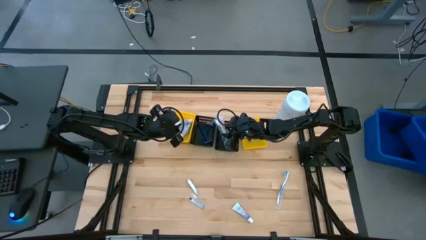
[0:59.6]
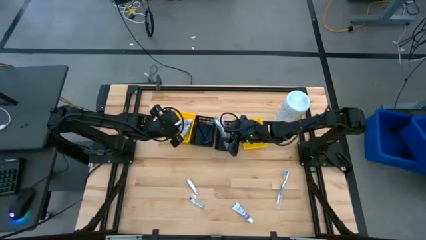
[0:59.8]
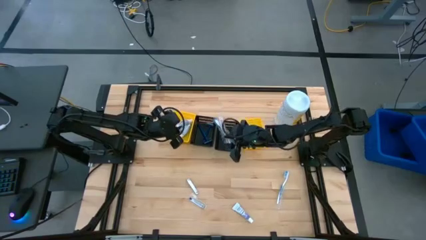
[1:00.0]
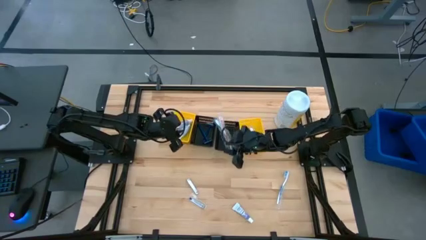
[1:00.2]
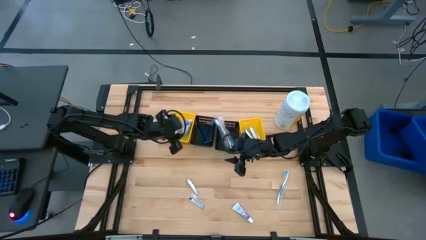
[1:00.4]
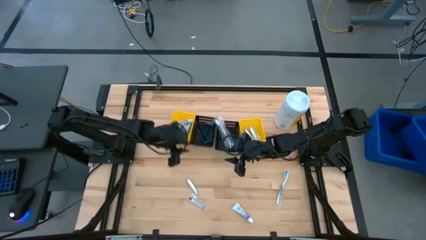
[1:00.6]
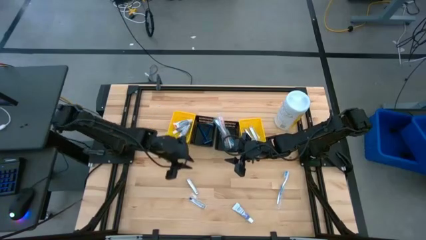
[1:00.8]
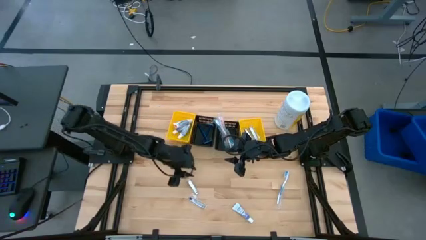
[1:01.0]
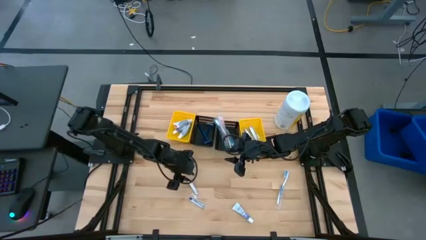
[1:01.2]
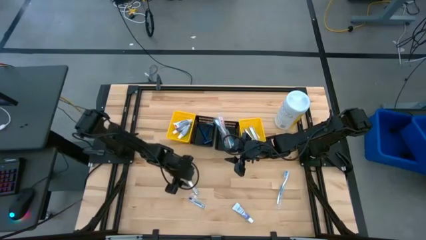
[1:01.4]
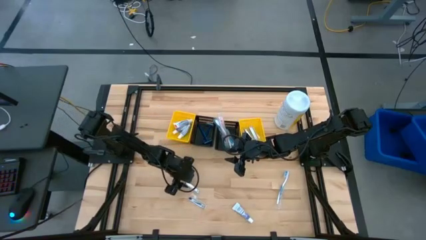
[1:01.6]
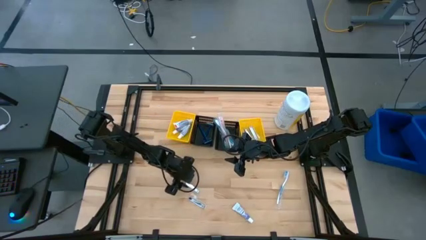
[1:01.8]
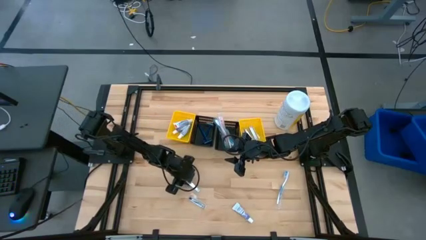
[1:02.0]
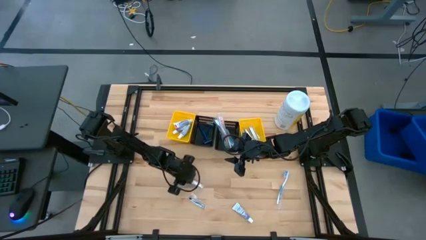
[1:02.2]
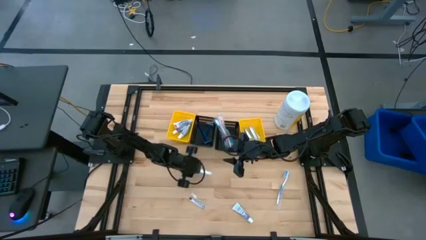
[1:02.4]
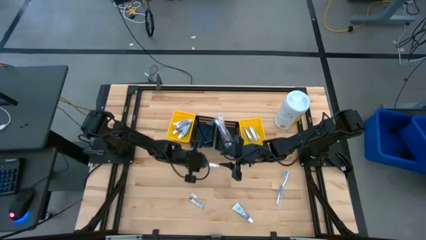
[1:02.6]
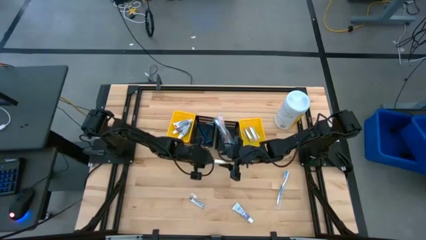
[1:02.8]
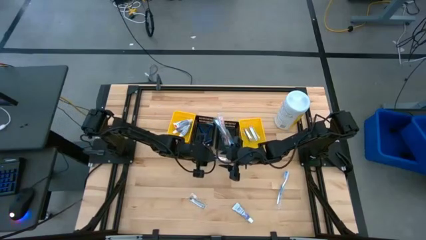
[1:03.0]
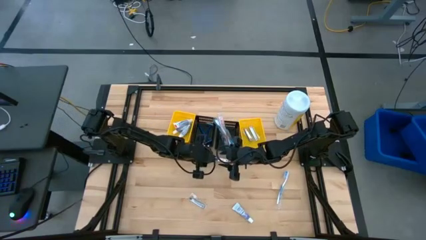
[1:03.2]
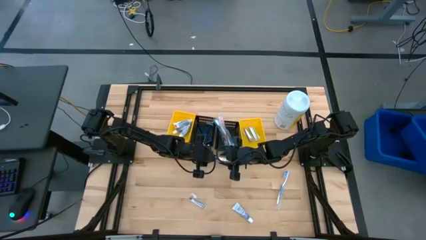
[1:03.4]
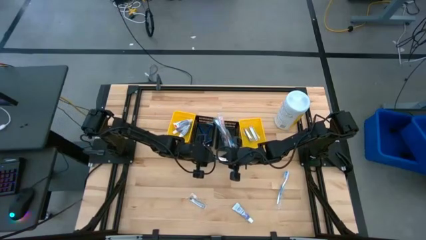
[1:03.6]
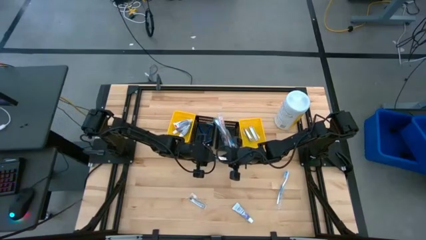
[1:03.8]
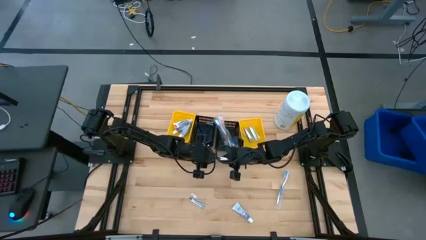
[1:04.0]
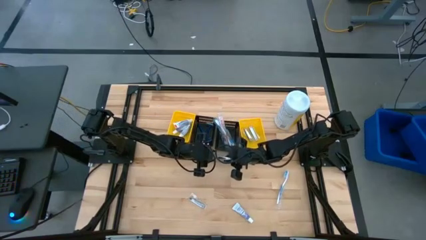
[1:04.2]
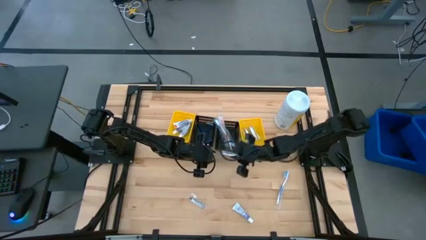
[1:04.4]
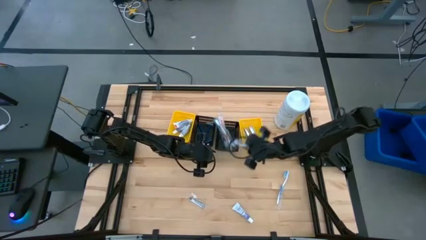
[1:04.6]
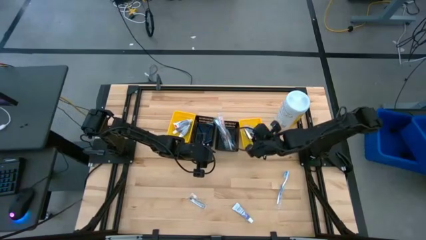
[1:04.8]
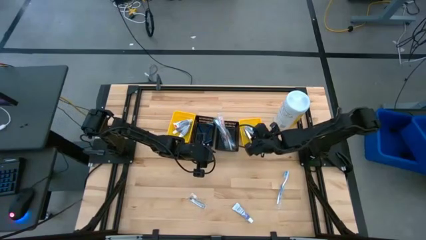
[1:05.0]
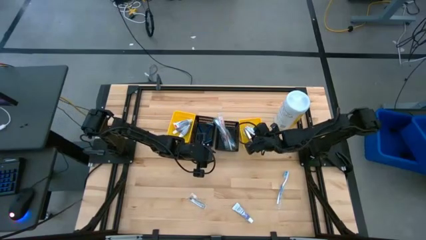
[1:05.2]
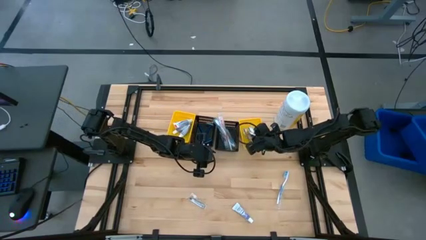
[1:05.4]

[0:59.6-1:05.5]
Task: Pick & Place Travel size toiletries
Put the silver nail cutter into the right yellow bin

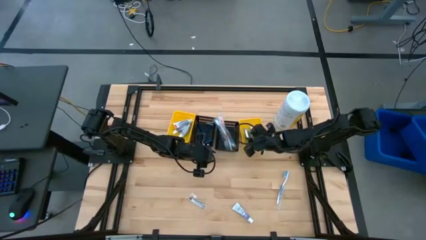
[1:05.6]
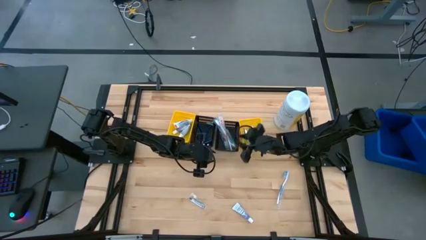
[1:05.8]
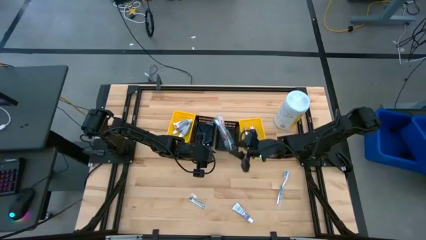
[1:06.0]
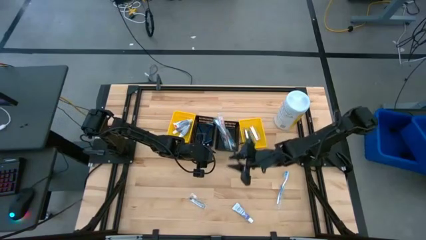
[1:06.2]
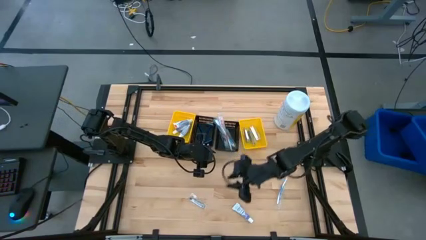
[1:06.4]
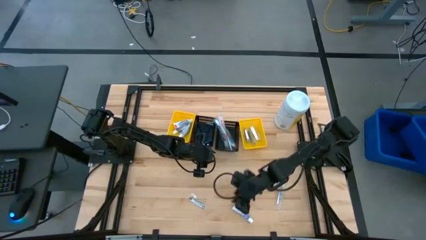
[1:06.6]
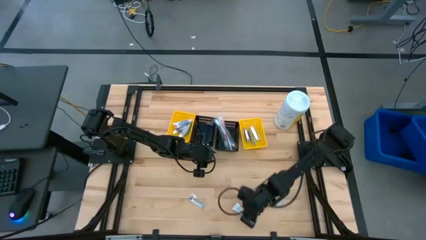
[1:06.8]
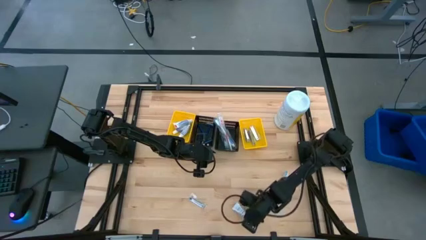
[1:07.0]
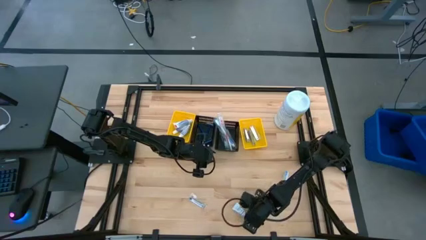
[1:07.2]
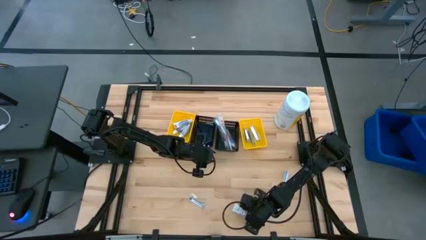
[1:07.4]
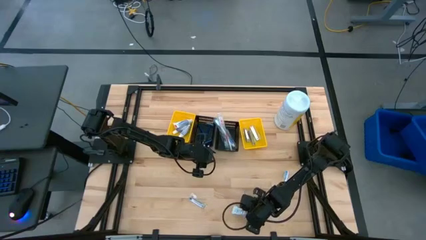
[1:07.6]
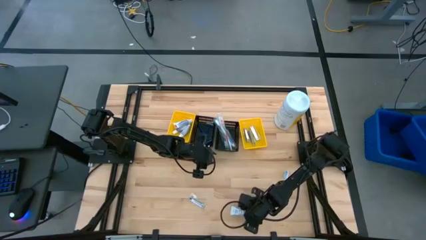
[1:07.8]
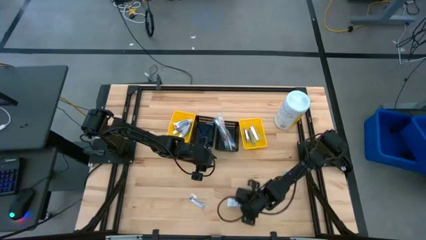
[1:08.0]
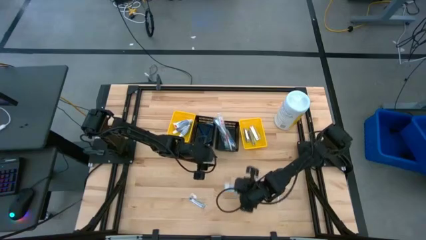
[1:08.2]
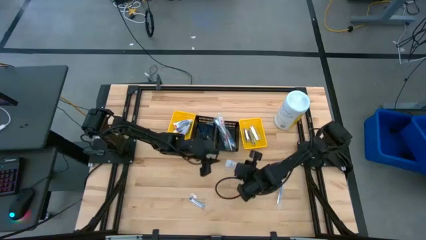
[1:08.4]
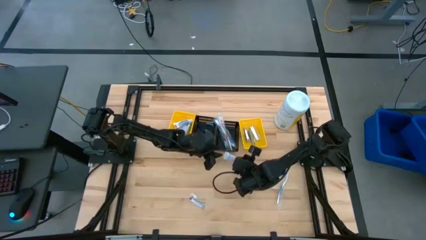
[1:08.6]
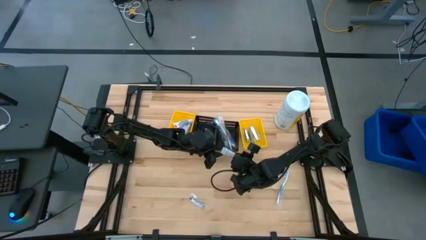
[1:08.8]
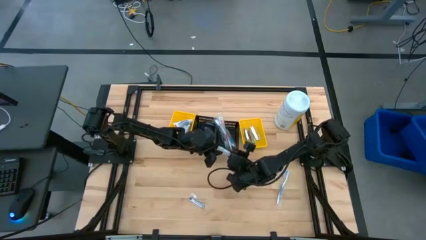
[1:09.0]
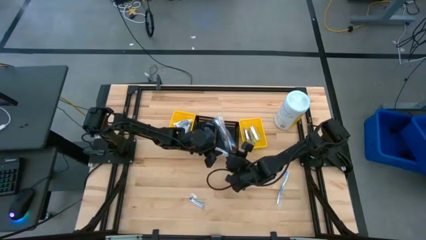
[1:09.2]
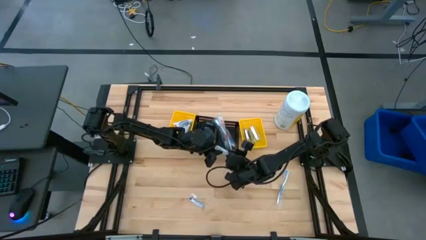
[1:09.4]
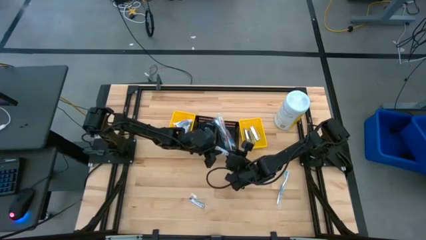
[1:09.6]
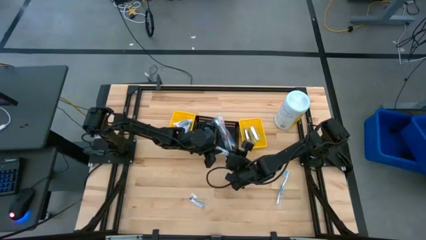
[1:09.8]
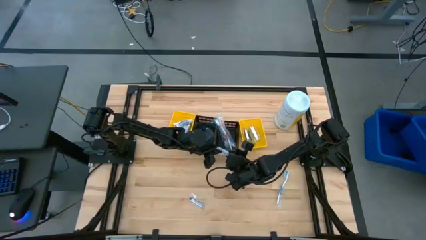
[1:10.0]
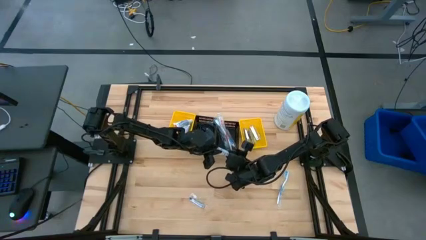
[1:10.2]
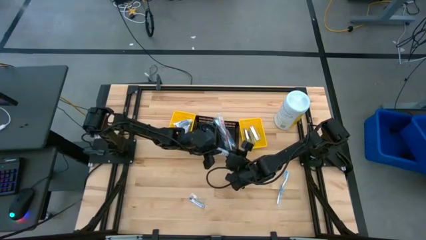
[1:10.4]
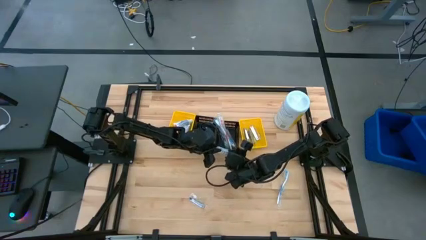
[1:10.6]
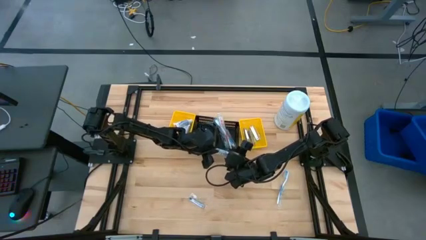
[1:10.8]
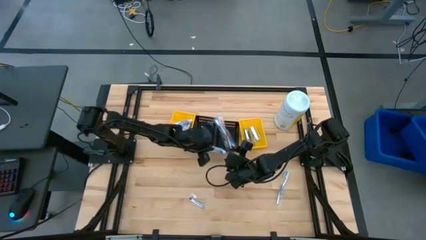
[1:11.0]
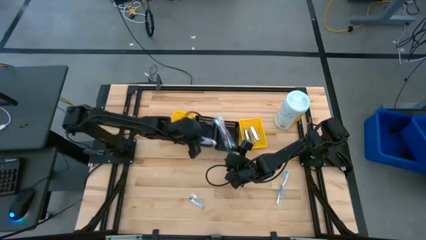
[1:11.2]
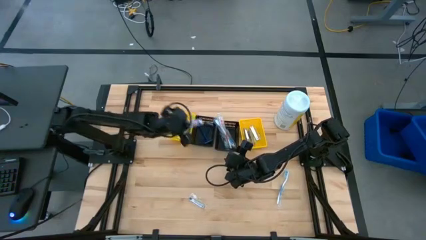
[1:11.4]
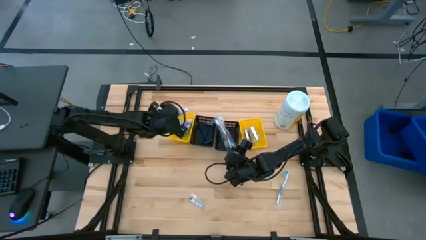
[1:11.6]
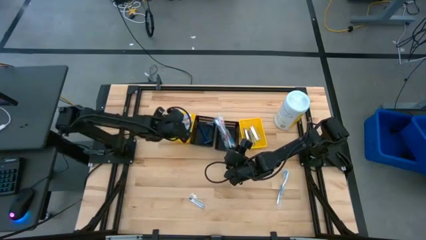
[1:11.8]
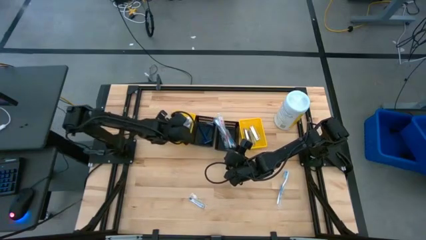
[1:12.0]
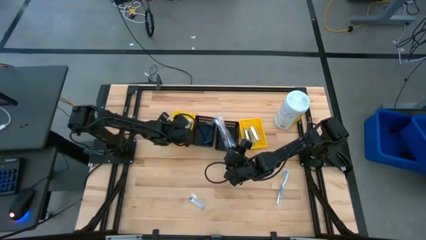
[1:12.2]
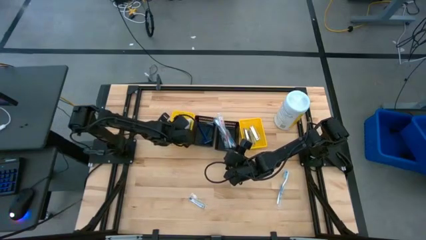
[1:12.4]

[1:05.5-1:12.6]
Put the white toothpaste into the left yellow bin

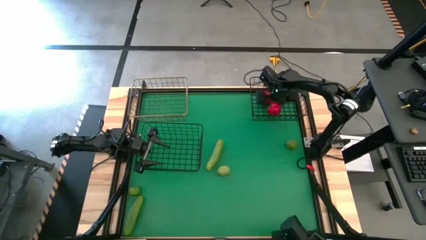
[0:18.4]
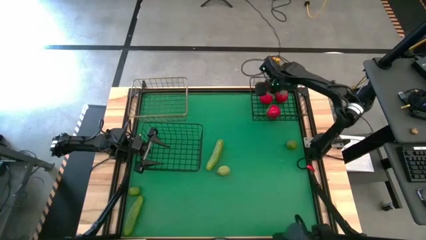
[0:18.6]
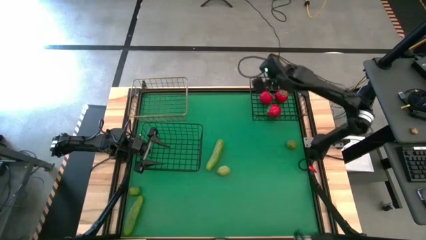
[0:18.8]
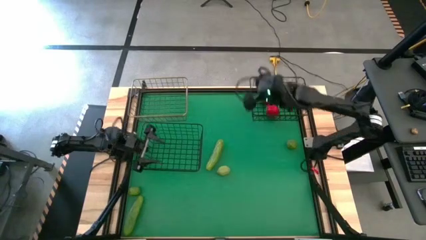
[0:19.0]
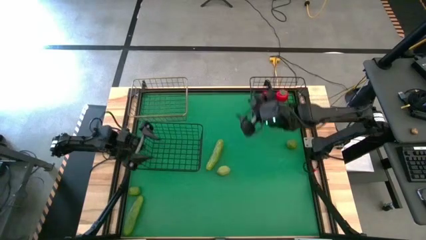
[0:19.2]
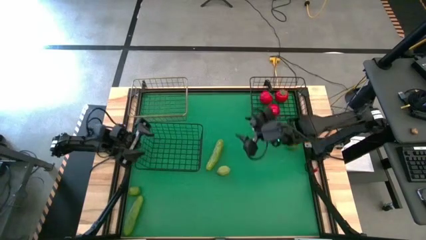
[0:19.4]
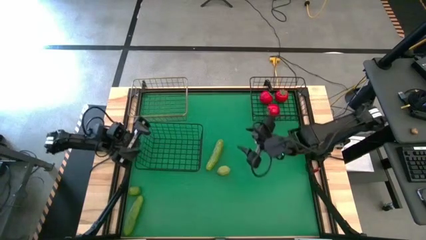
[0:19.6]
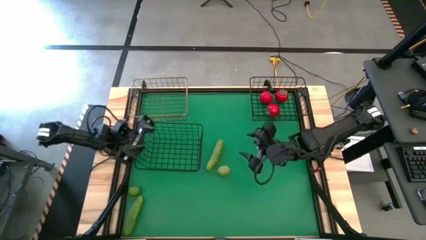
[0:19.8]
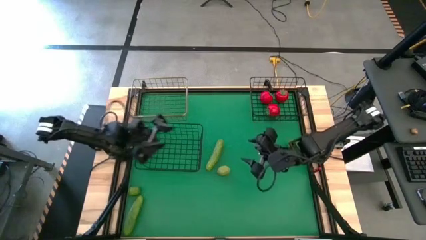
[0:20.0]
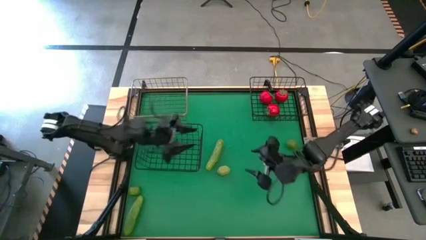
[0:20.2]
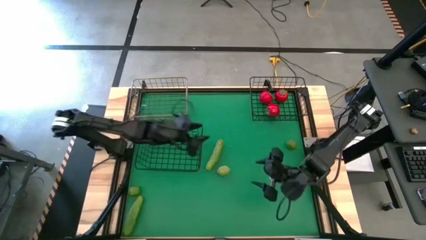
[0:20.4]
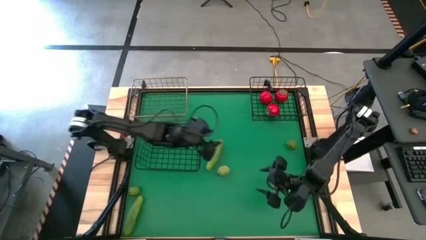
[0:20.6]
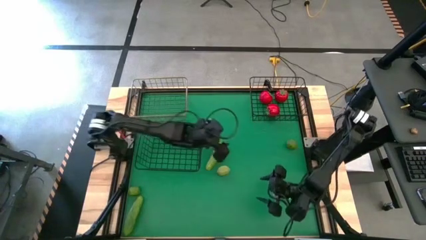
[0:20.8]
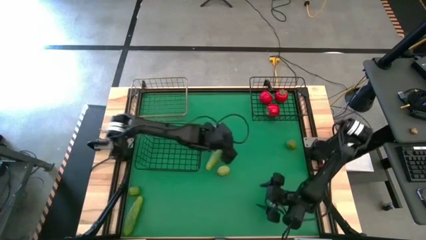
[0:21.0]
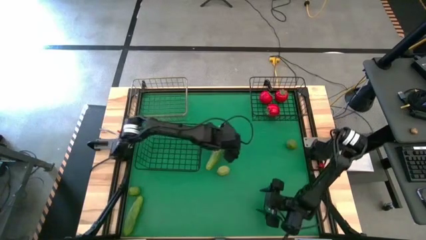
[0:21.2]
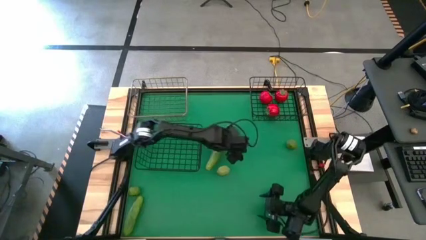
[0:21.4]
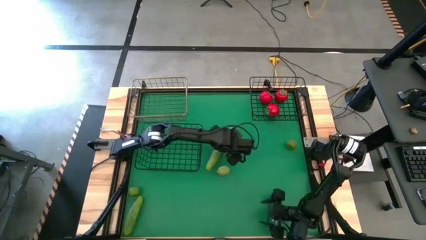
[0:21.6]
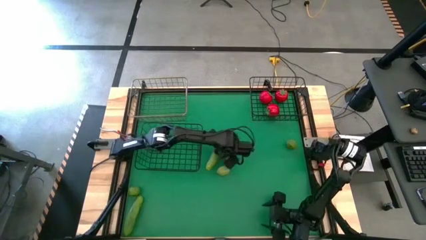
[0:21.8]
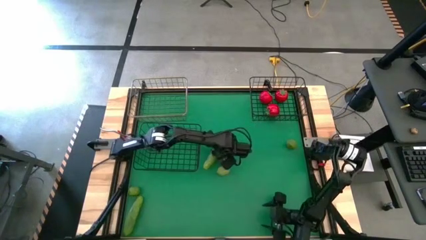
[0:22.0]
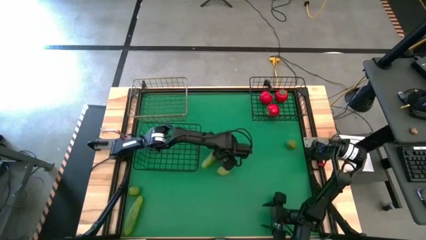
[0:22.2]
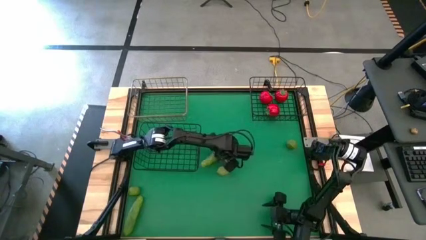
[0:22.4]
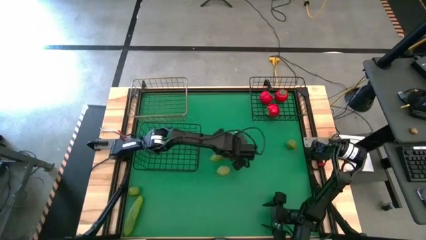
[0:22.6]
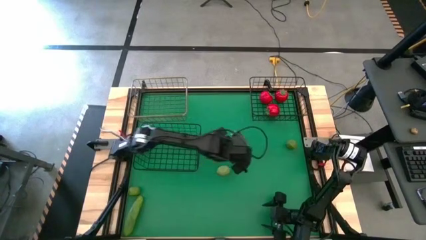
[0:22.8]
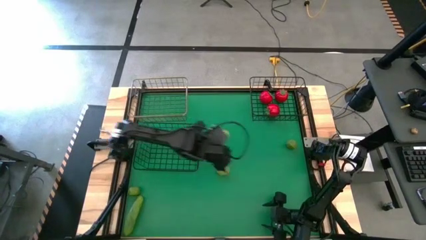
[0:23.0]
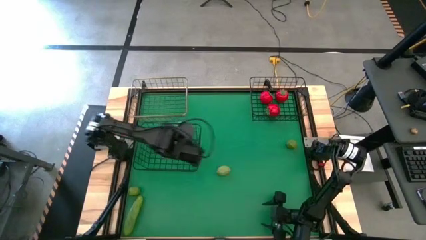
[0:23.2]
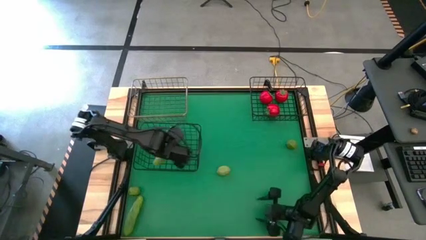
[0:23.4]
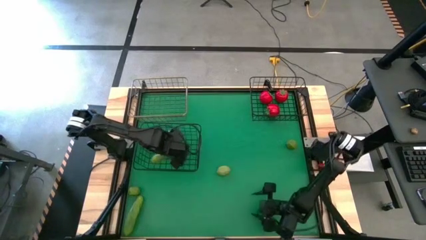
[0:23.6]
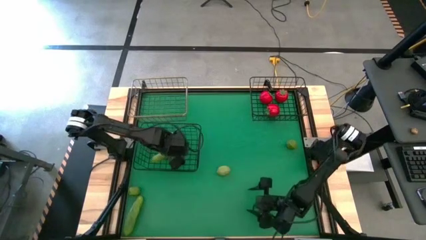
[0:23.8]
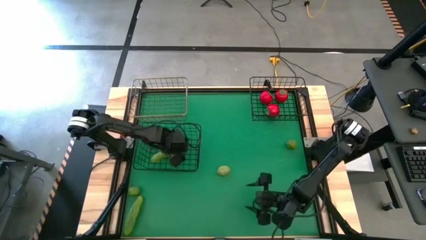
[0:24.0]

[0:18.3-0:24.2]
Task: Sort produce into baskets
Put the top cucumber into the left black metal wire basket
